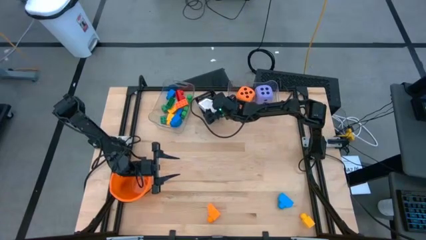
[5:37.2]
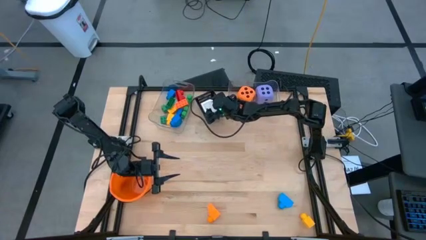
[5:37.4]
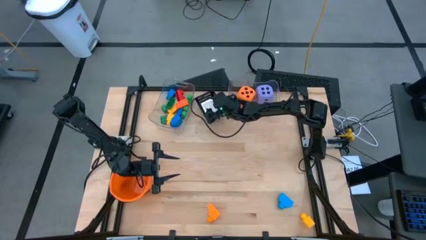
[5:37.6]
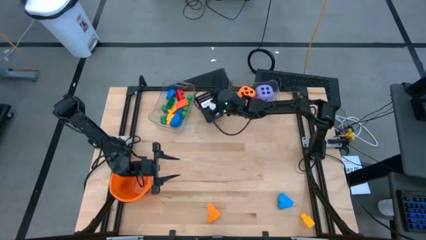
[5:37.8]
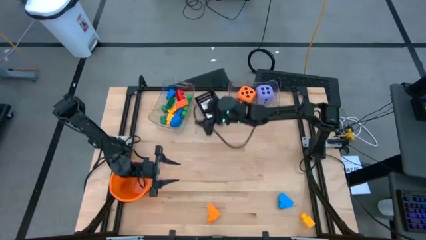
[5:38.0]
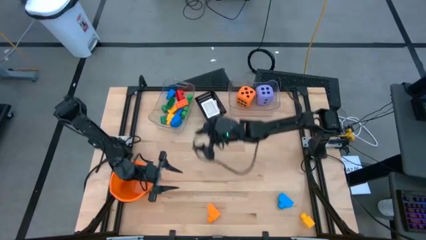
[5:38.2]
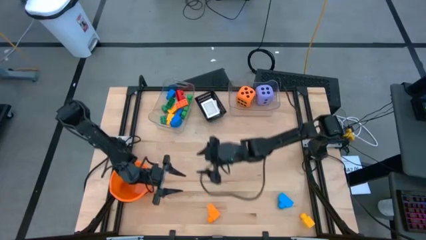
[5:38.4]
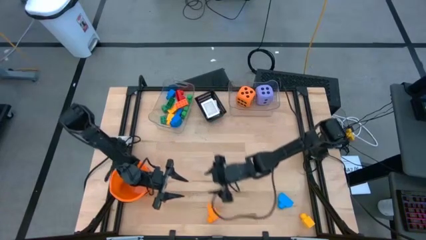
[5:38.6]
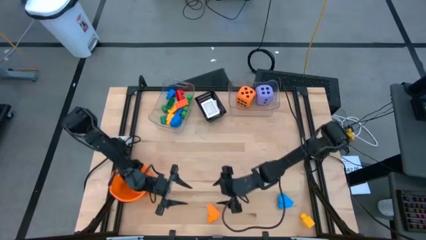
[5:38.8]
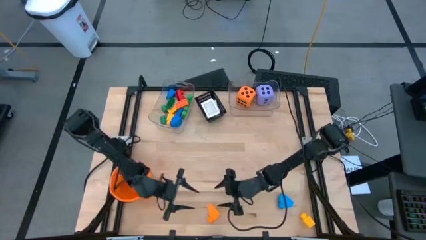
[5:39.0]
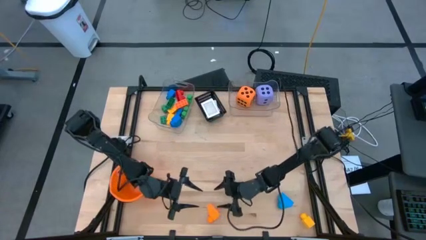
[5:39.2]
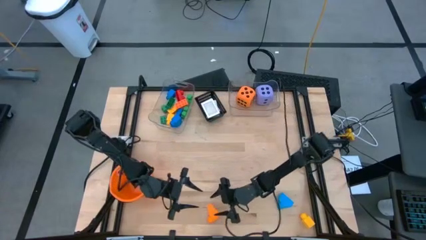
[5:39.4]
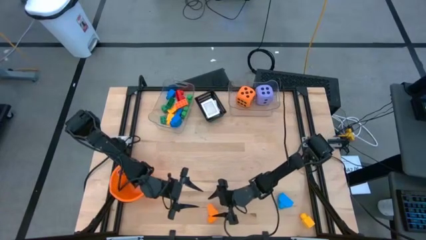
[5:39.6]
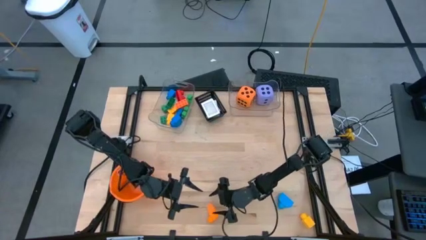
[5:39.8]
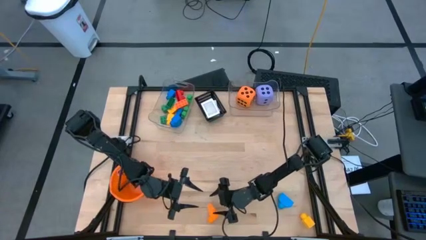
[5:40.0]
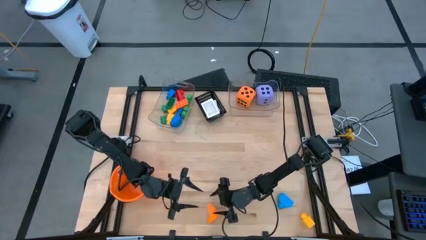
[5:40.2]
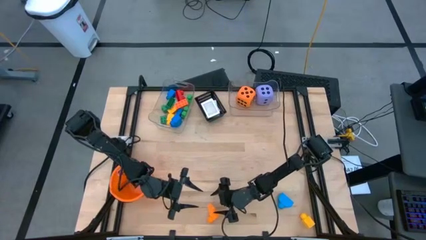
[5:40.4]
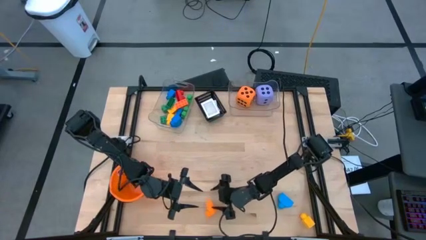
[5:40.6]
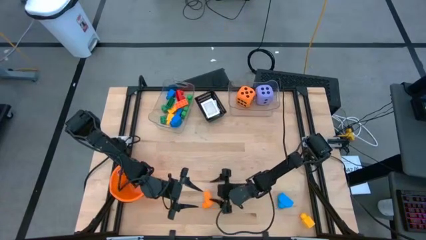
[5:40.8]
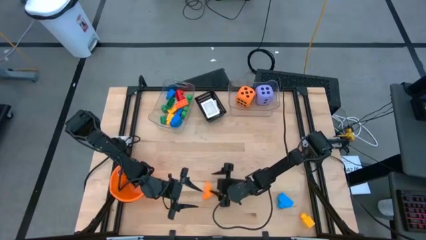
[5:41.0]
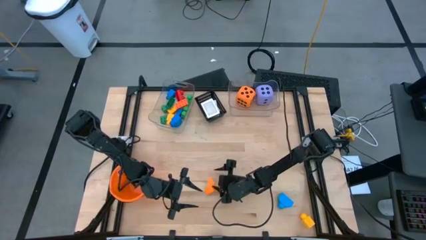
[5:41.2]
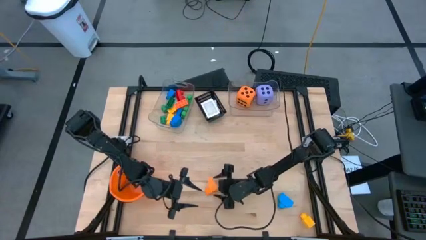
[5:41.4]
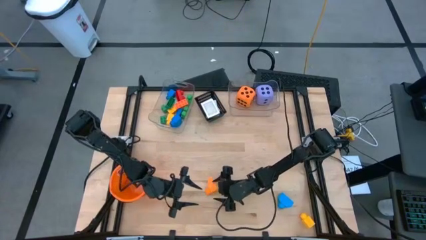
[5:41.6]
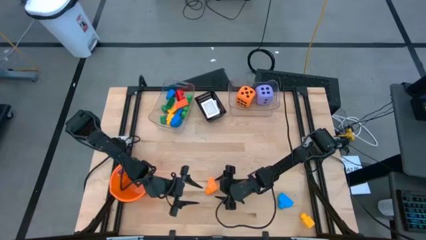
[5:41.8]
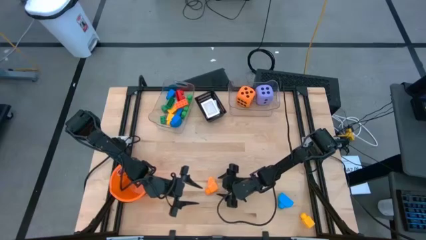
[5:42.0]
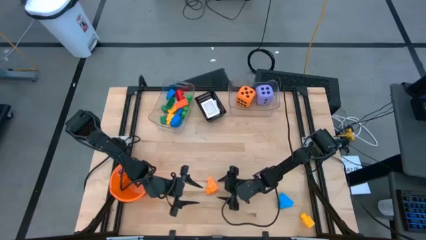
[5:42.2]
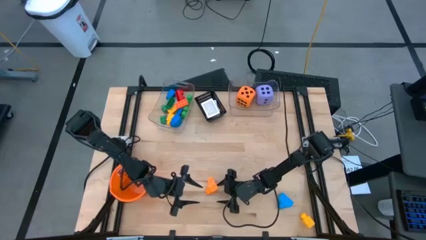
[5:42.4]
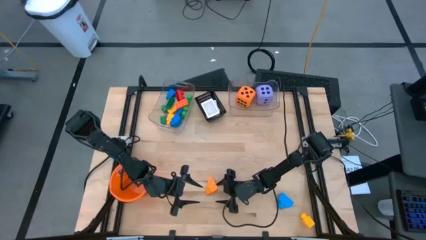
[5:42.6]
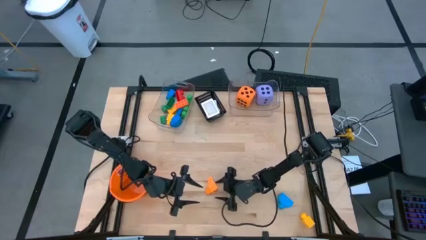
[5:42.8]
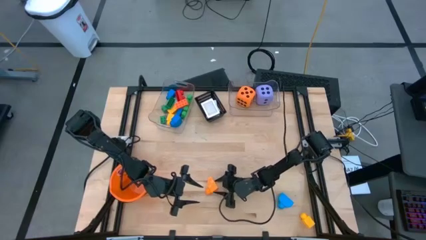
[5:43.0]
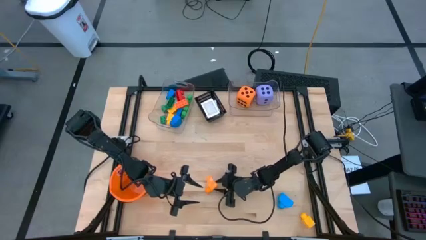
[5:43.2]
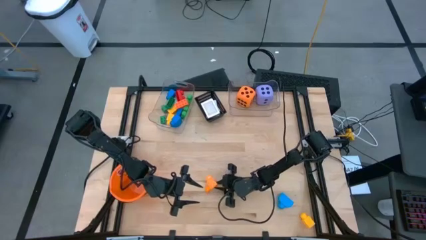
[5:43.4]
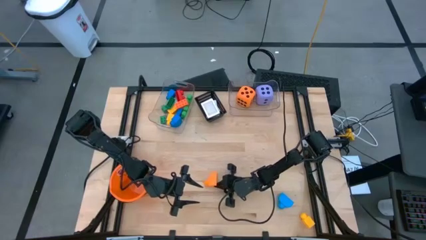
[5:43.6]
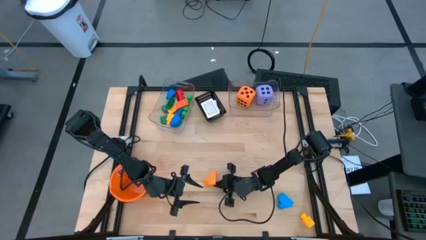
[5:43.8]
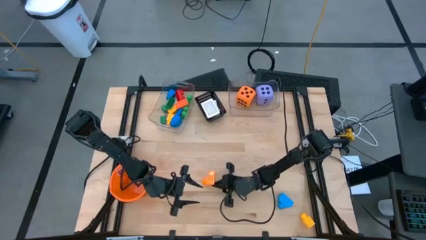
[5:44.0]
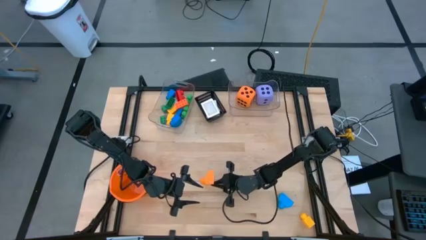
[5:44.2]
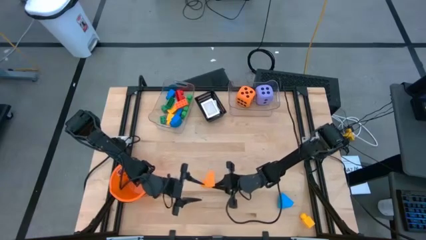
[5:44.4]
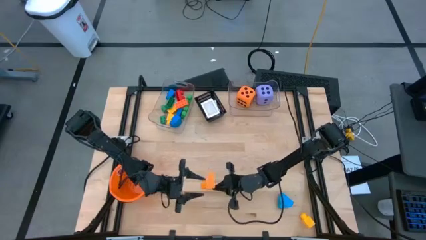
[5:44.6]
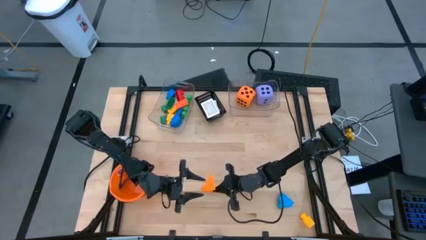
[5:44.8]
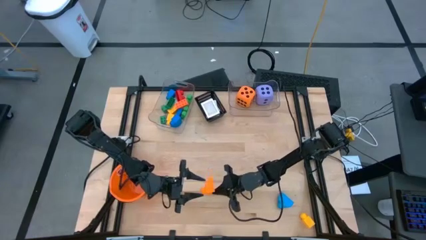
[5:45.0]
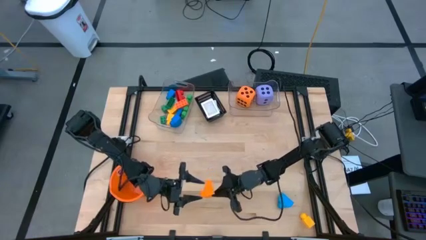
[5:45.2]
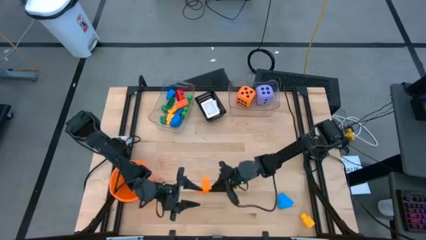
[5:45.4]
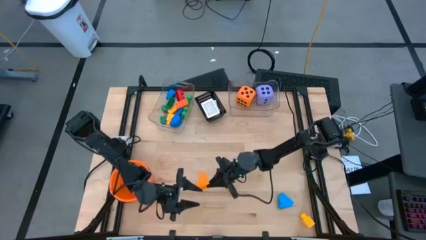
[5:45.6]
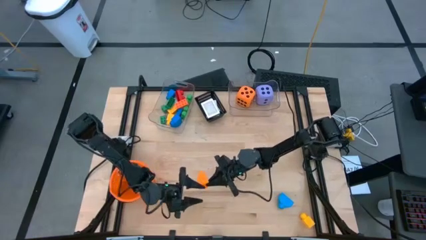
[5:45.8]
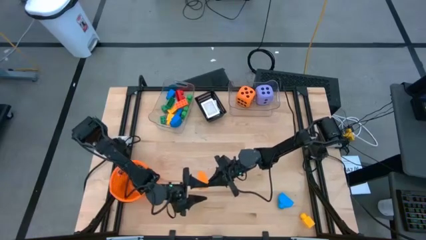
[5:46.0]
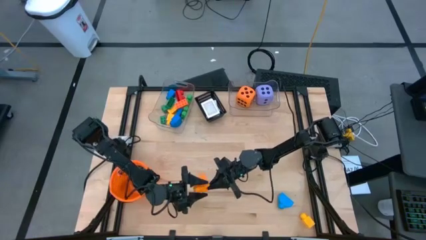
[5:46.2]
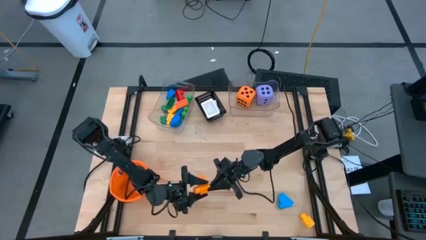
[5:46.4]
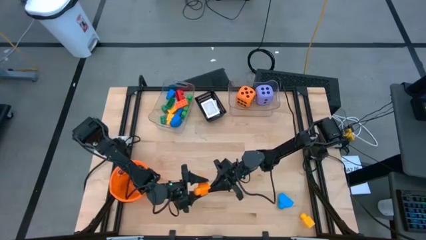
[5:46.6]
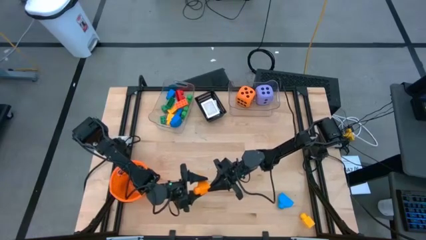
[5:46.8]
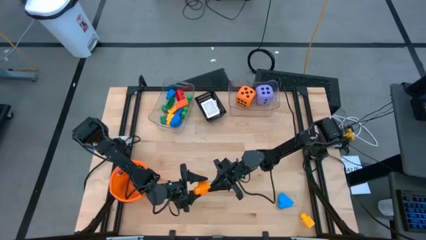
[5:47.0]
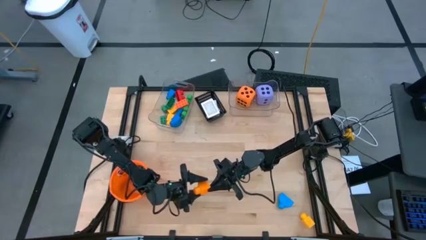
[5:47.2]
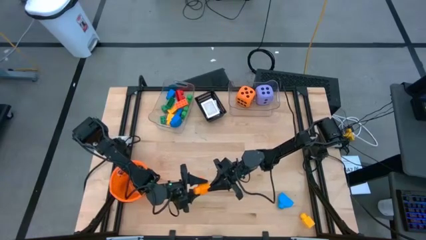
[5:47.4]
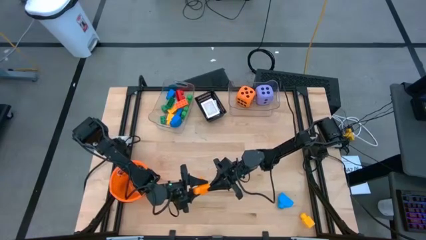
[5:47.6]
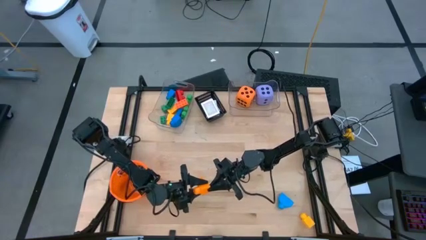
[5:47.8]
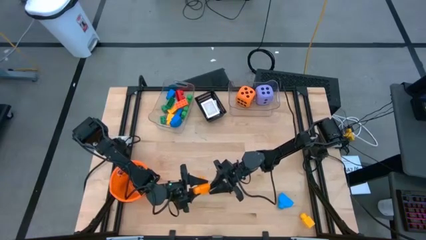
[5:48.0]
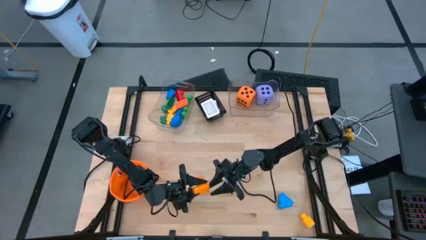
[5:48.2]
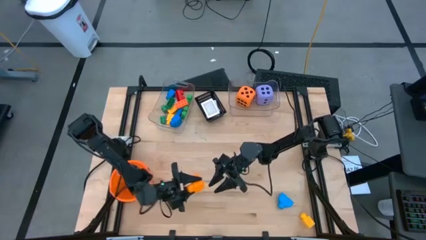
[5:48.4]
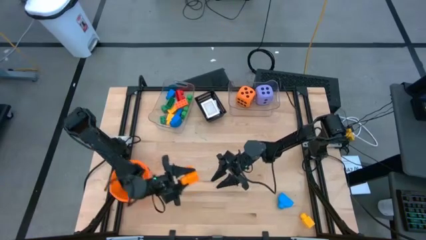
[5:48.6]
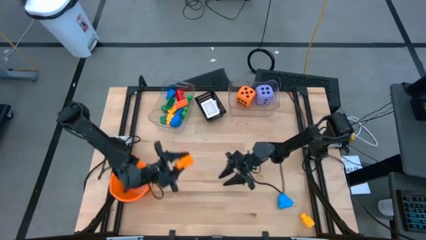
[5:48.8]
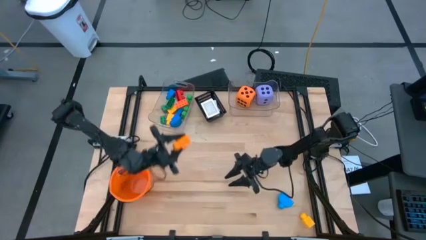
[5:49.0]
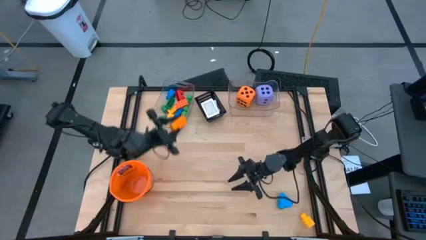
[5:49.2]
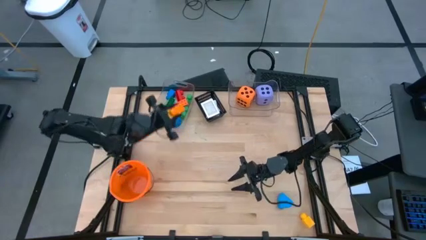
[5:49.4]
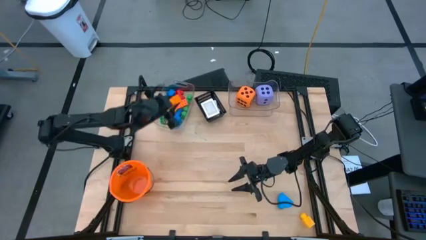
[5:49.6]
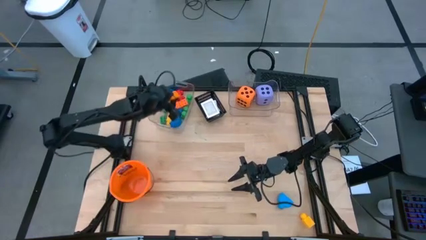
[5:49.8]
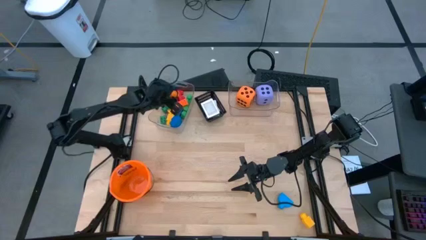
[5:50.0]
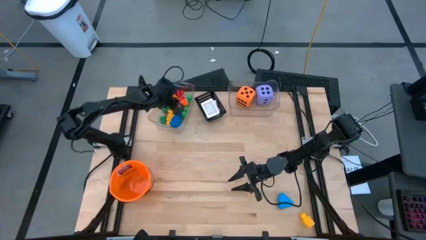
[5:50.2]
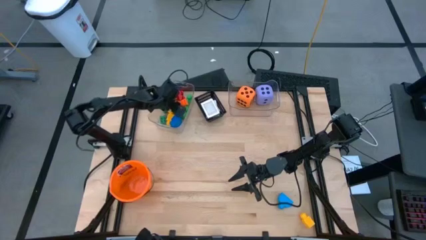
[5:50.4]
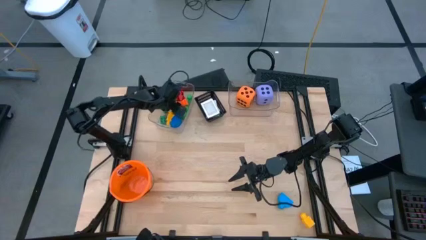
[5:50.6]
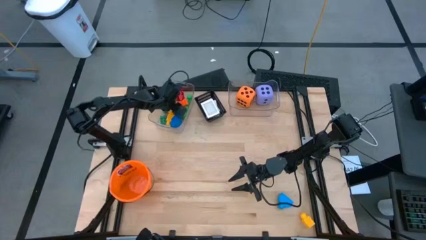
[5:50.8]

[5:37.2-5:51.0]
Task: Pick & Place Toys
Put the orange gamepiece into the left transparent bin

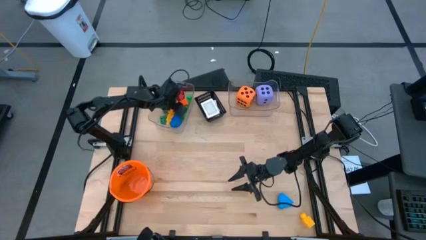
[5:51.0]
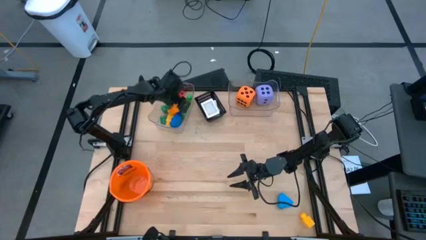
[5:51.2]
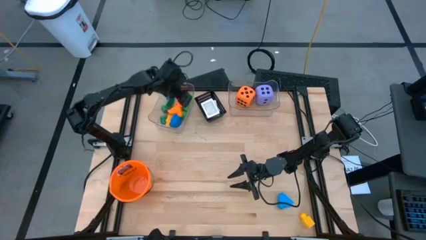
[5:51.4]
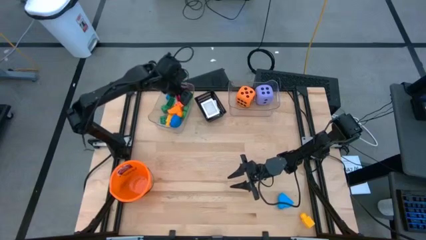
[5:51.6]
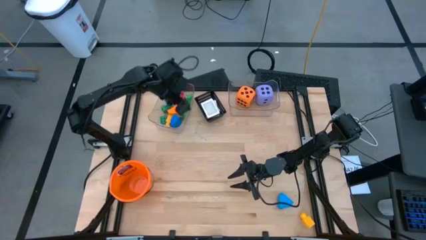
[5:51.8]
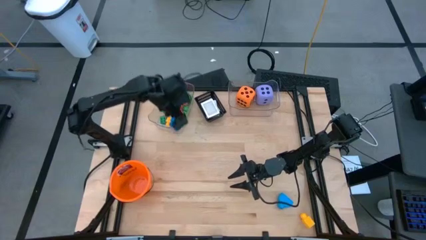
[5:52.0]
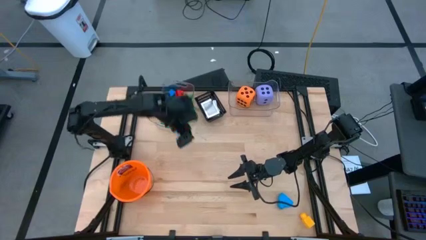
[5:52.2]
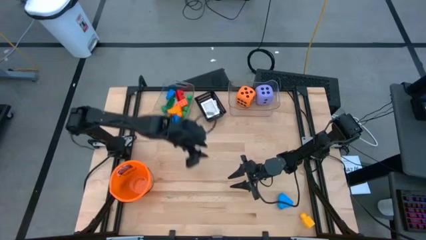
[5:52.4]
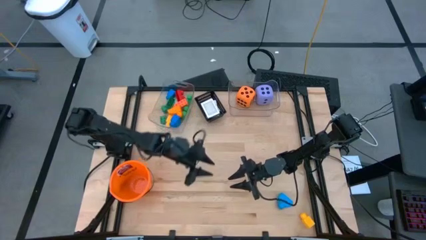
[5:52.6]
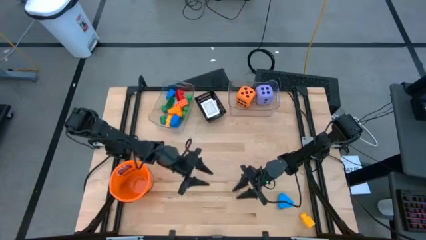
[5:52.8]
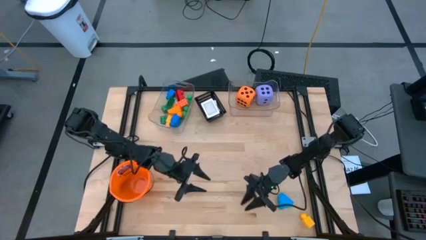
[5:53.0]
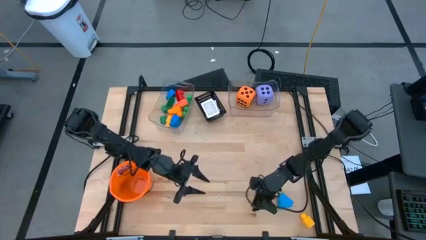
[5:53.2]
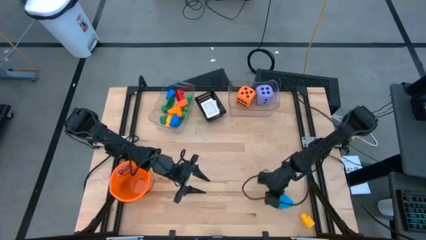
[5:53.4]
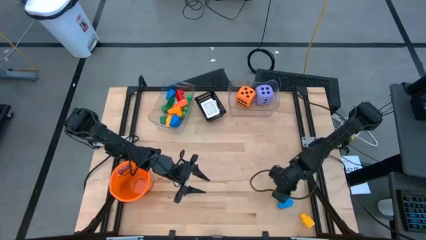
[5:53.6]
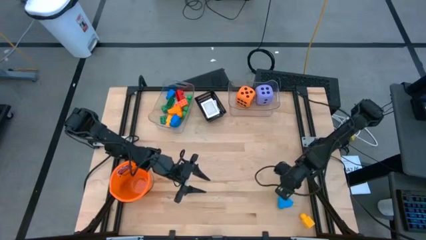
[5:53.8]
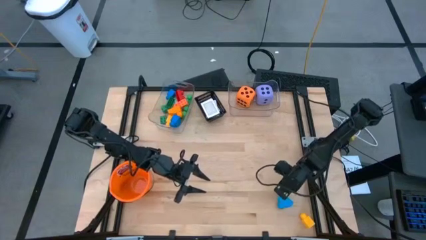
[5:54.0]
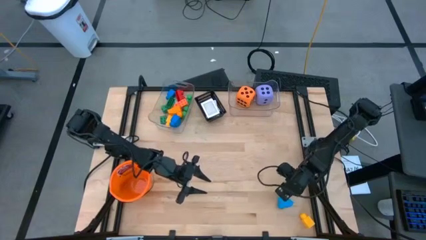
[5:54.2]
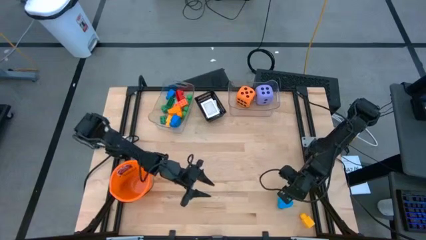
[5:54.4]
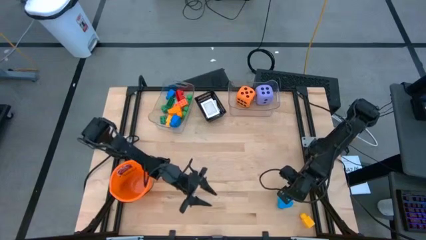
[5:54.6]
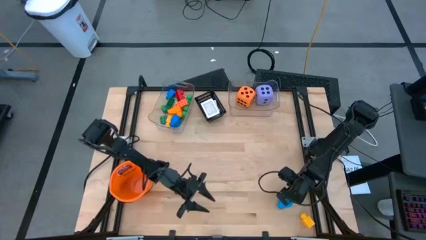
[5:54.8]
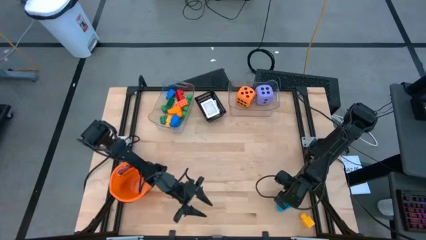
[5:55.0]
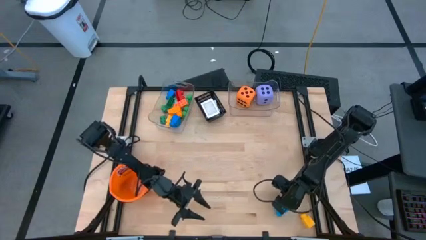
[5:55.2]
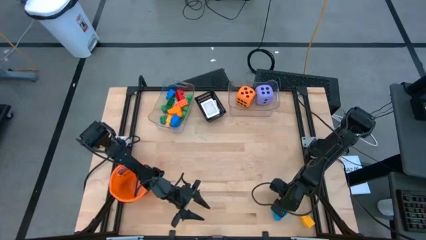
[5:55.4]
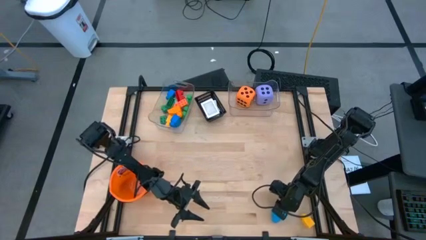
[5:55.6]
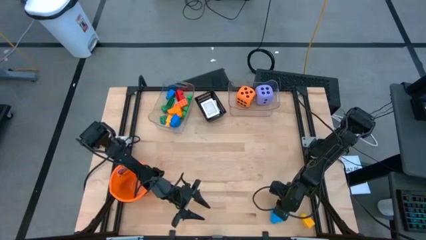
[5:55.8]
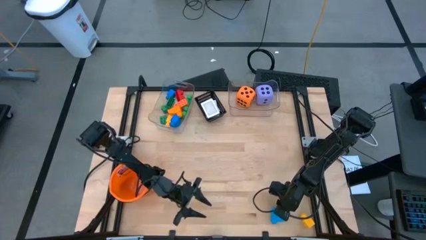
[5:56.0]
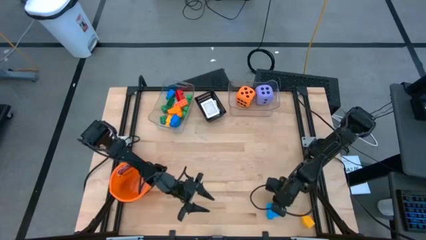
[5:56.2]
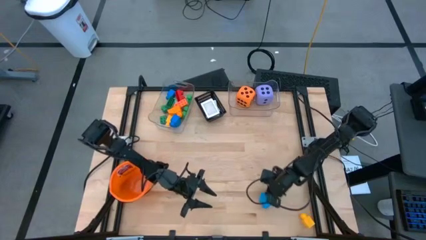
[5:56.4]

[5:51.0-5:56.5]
Put the blue gamepiece into the left transparent bin
